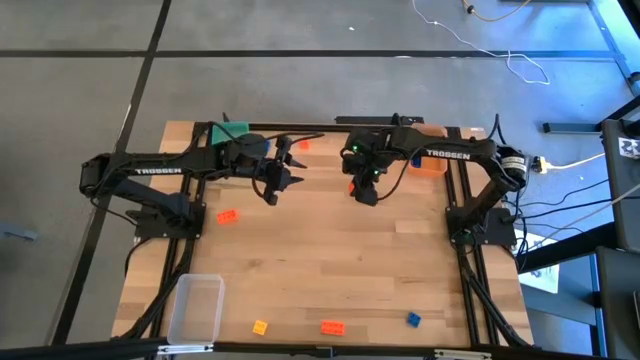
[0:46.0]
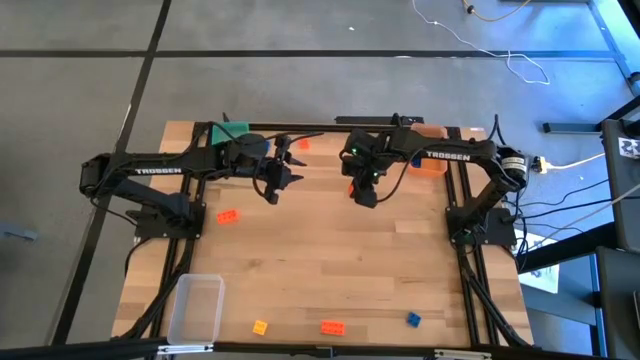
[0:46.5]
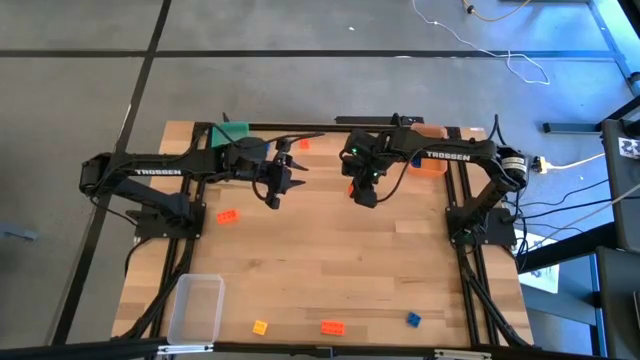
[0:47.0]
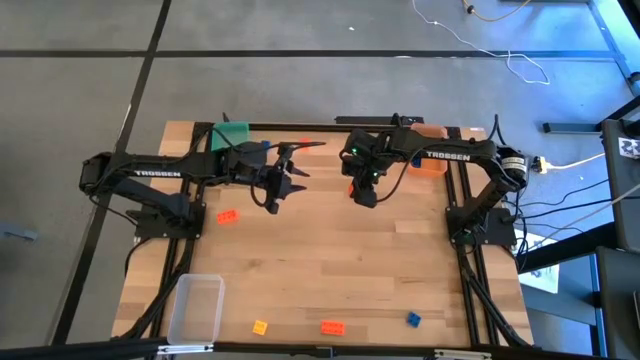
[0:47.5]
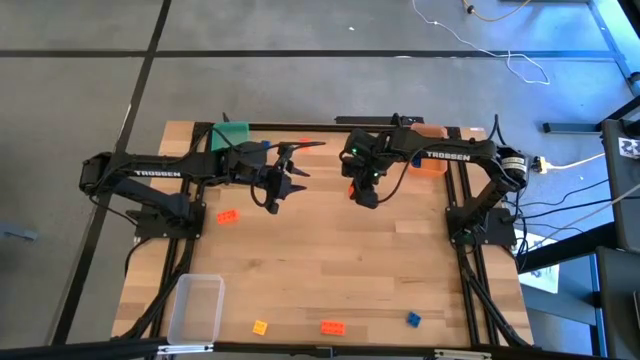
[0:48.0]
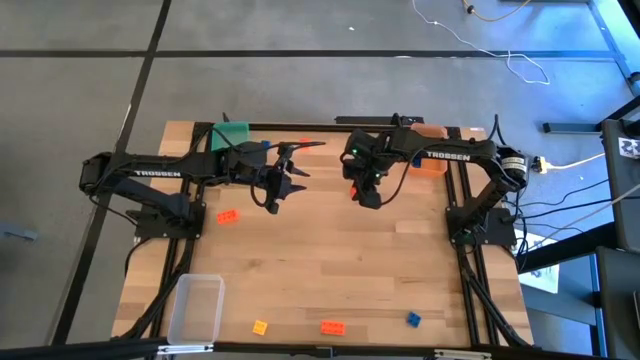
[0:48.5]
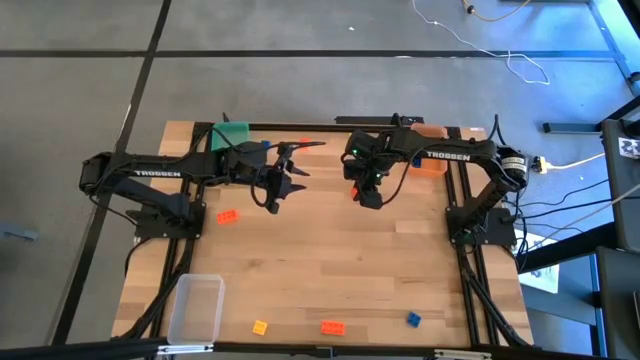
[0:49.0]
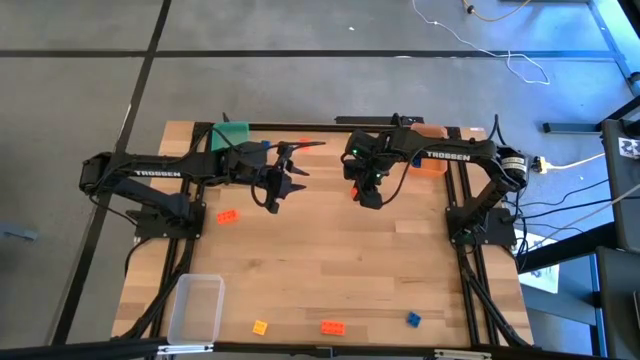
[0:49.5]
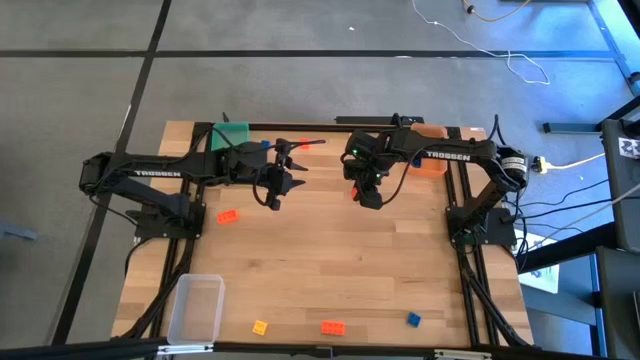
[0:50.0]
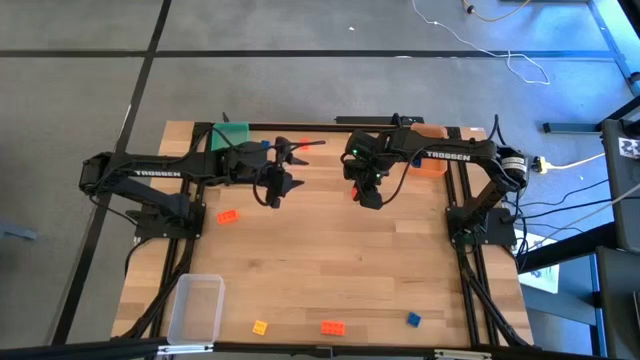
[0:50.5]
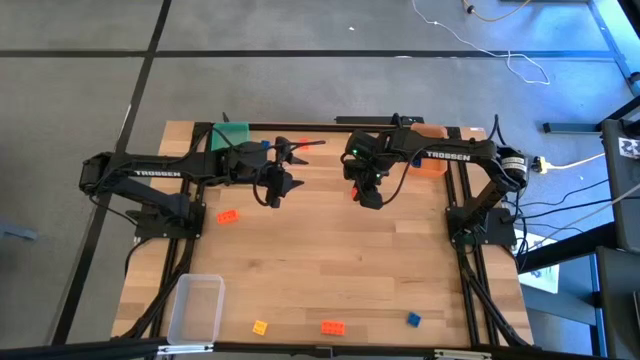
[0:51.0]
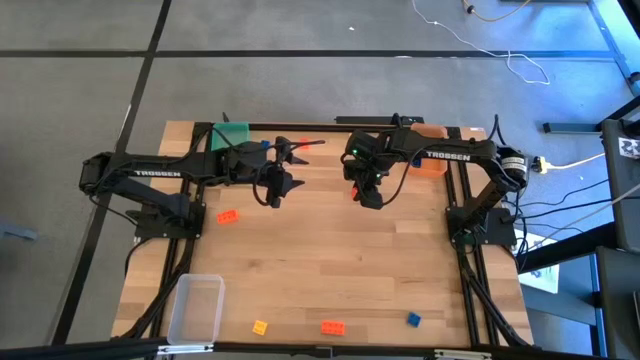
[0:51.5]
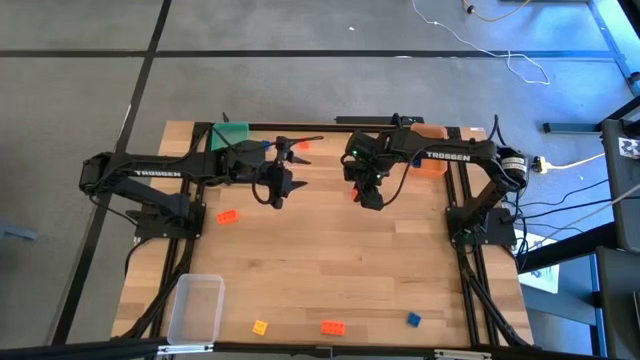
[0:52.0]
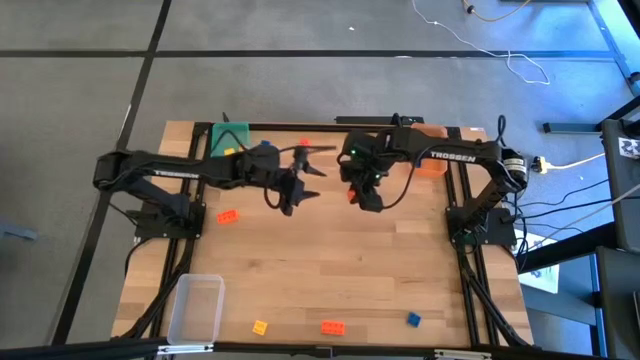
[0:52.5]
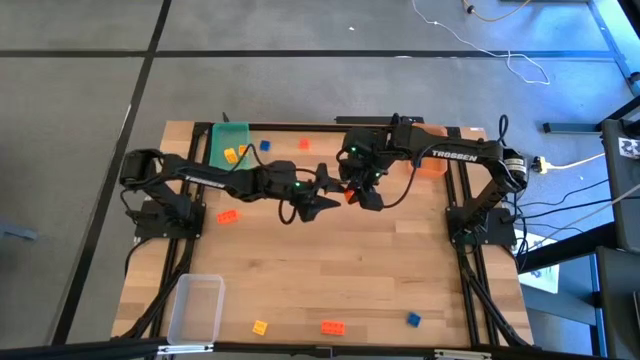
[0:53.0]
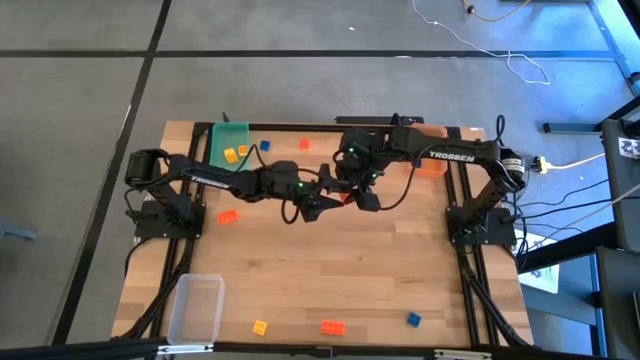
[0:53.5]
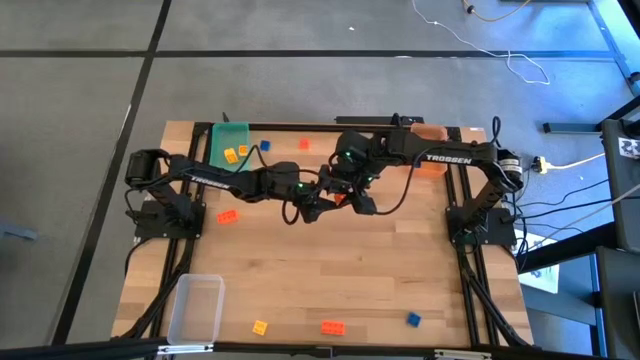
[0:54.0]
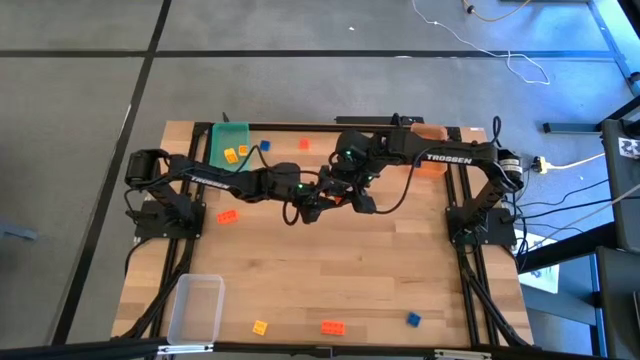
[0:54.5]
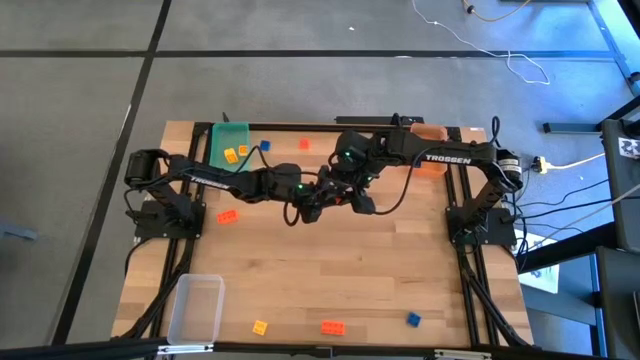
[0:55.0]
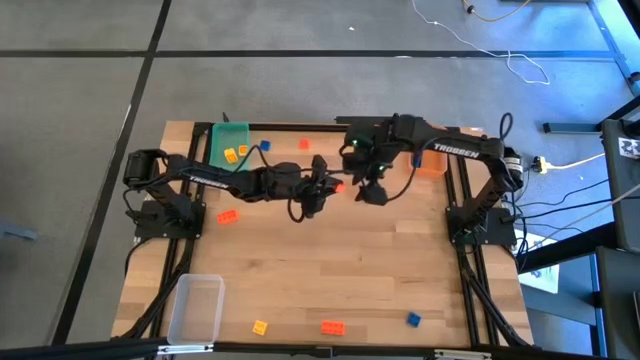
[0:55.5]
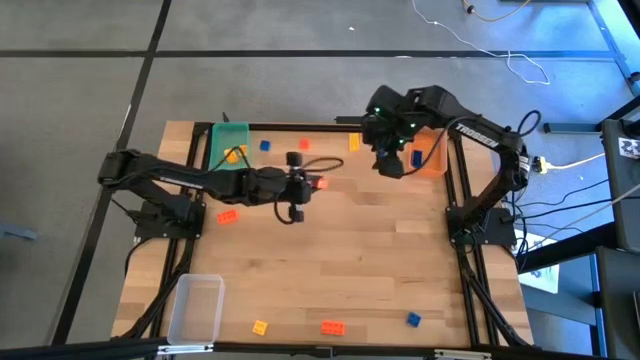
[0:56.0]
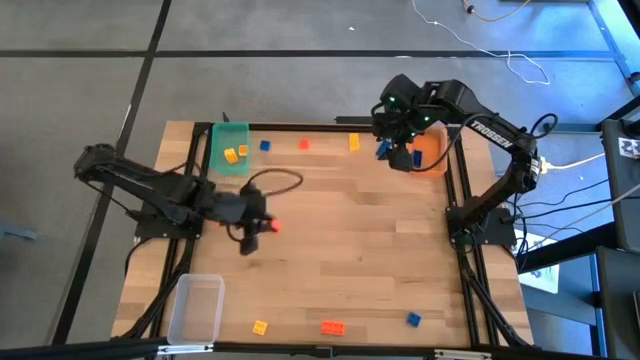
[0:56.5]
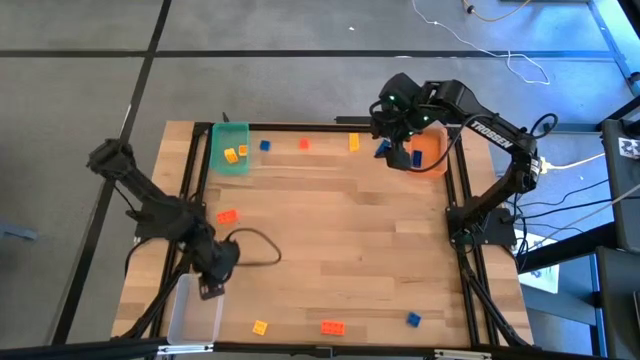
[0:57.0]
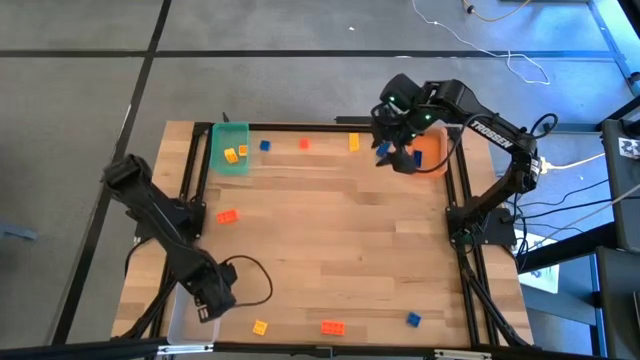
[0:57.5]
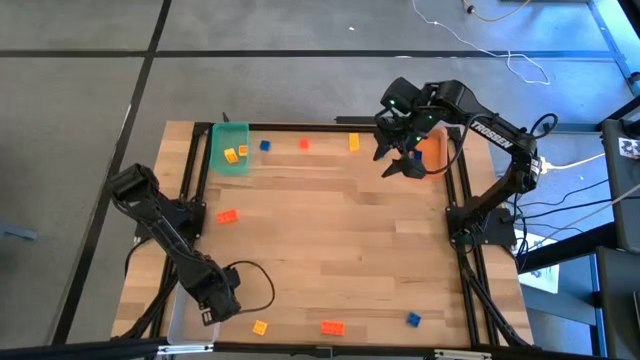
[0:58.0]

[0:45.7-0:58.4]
Task: Sort & place blocks by color
Put the orange game piece into the transparent bin

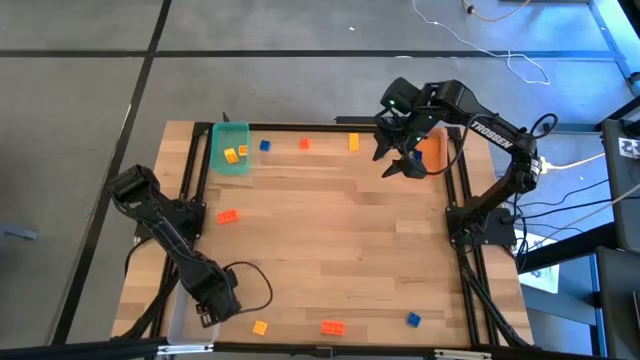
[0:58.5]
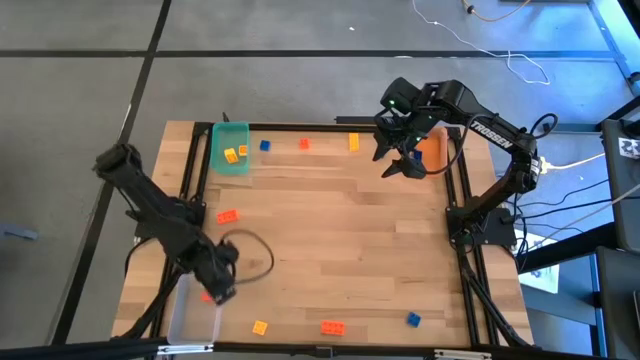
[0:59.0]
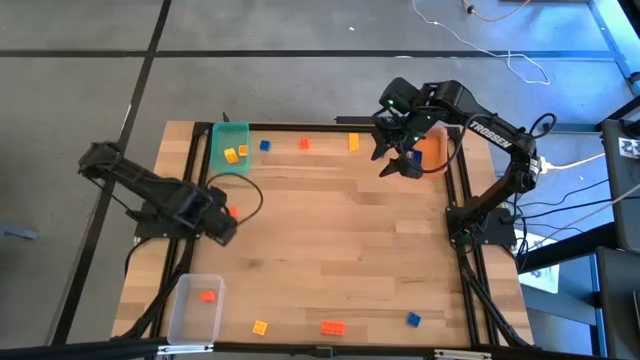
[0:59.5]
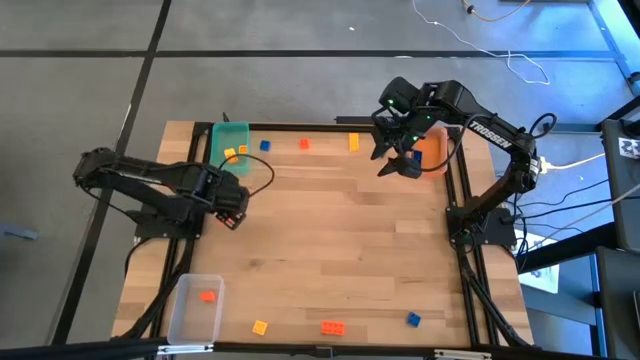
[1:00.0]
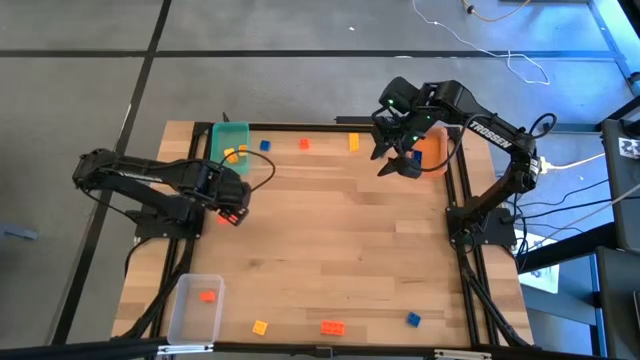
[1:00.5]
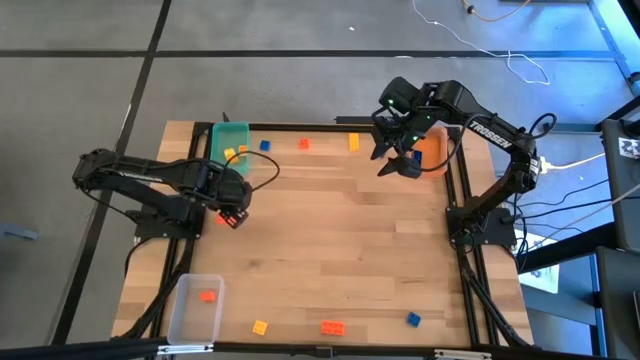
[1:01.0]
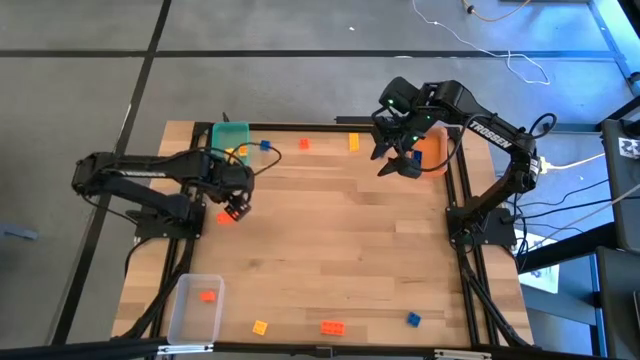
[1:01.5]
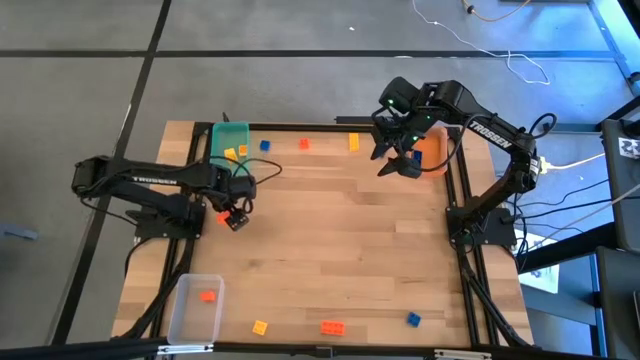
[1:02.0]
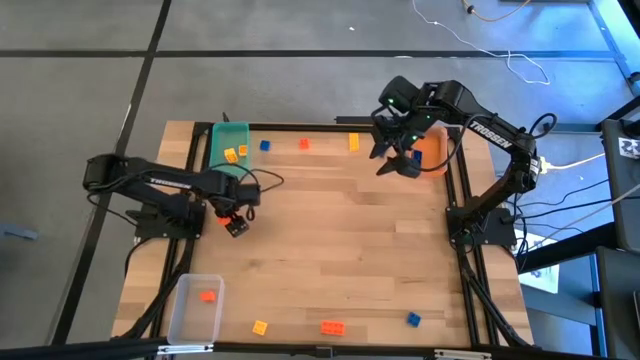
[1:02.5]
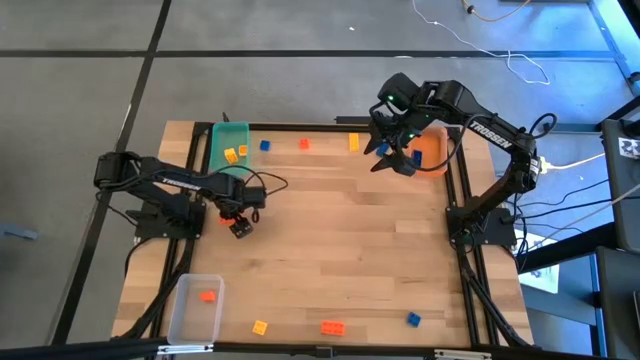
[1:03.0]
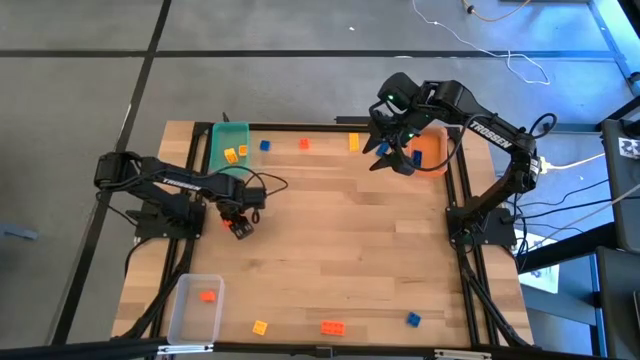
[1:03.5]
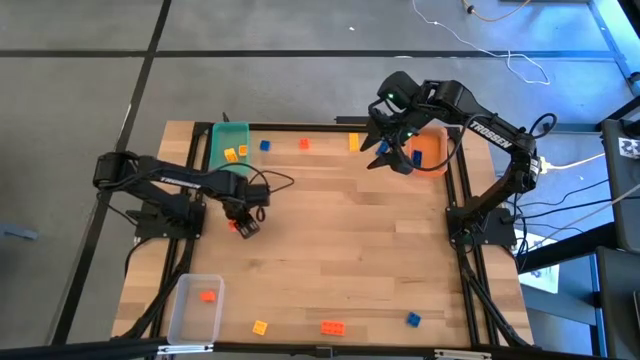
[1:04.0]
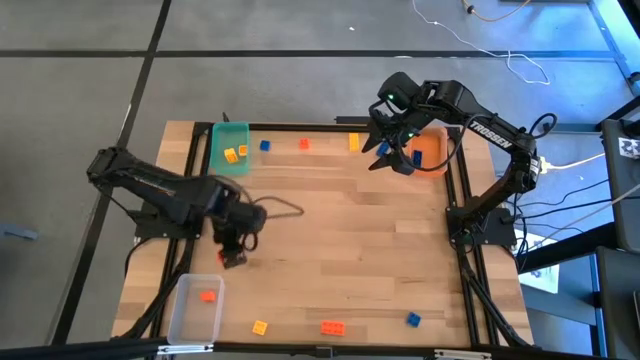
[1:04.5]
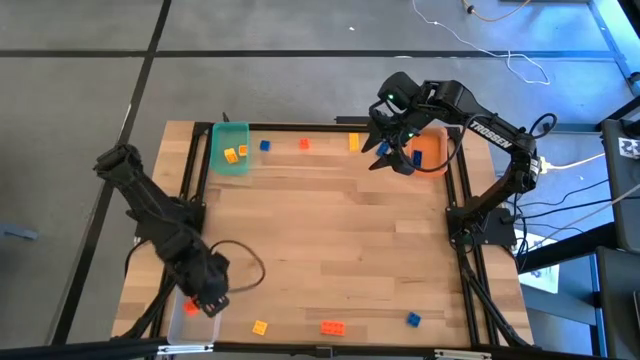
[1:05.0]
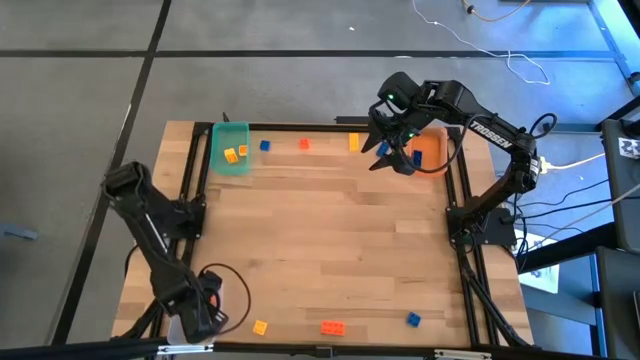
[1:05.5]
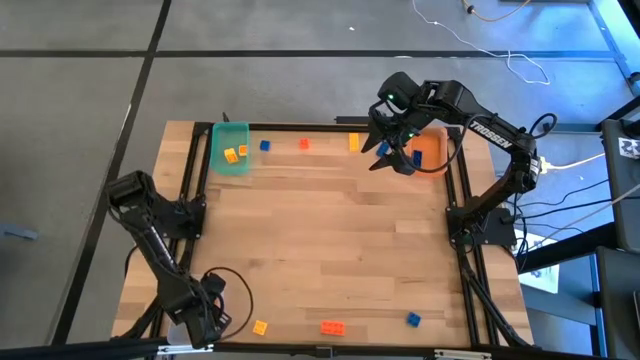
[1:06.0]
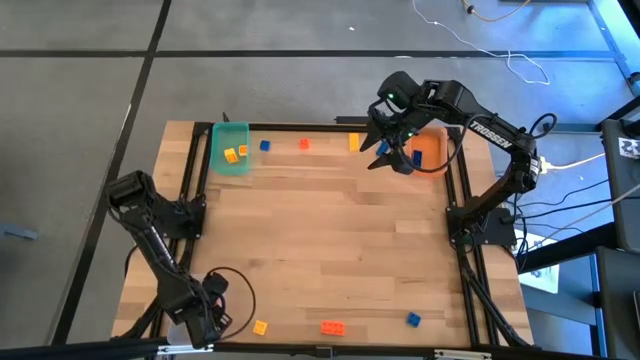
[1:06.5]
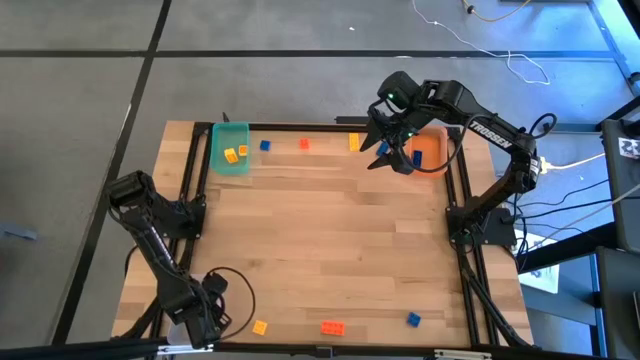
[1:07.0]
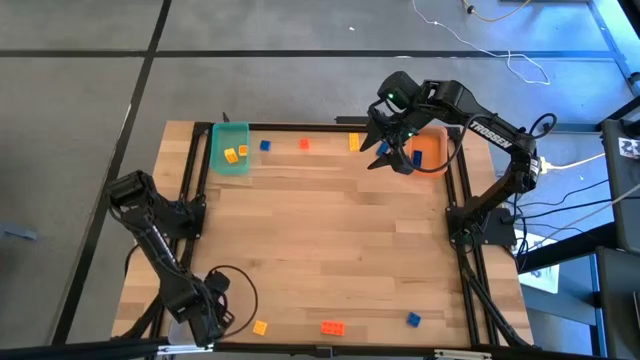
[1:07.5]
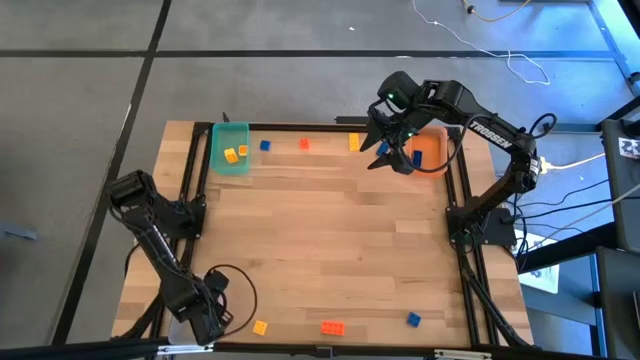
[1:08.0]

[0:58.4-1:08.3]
Put the orange game piece into the transparent bin
